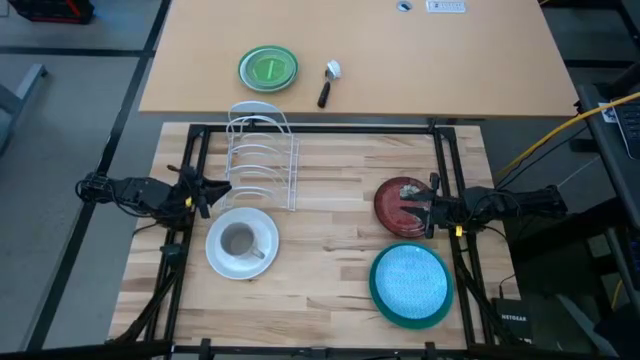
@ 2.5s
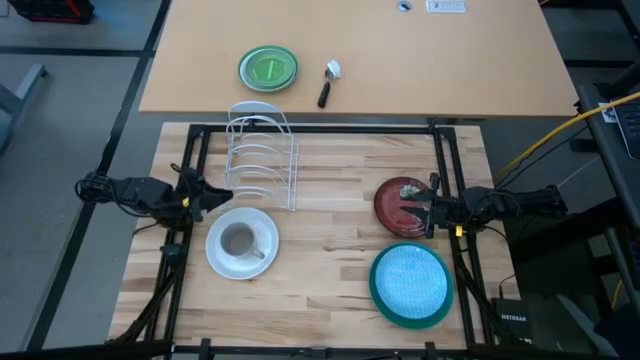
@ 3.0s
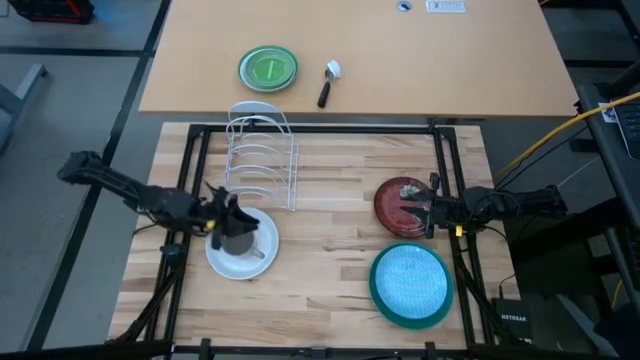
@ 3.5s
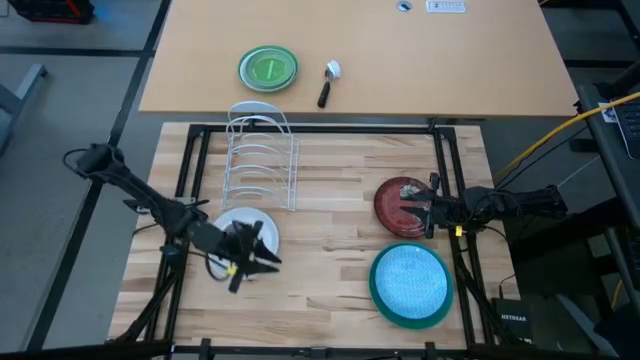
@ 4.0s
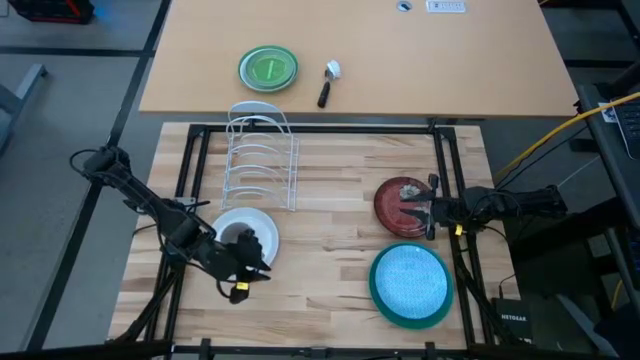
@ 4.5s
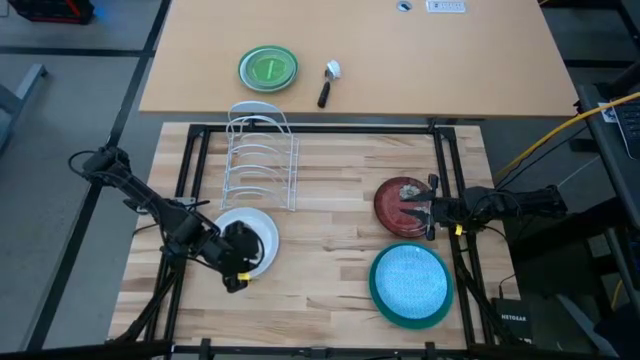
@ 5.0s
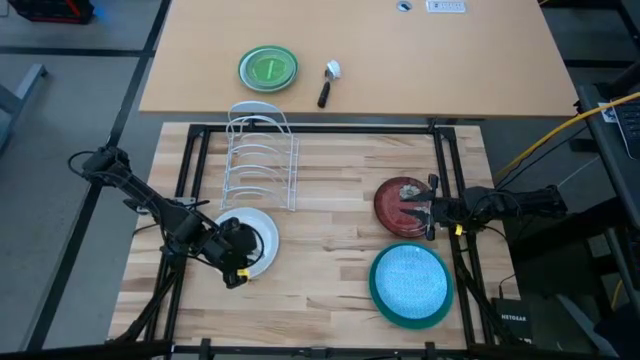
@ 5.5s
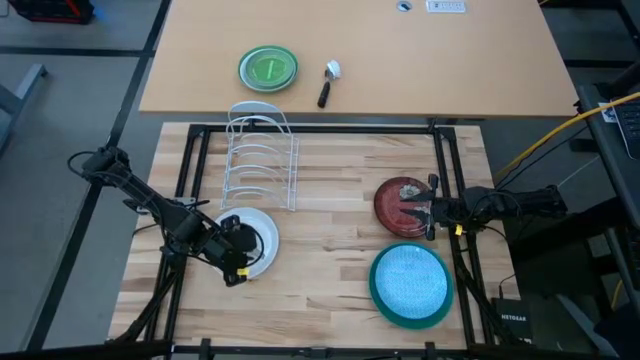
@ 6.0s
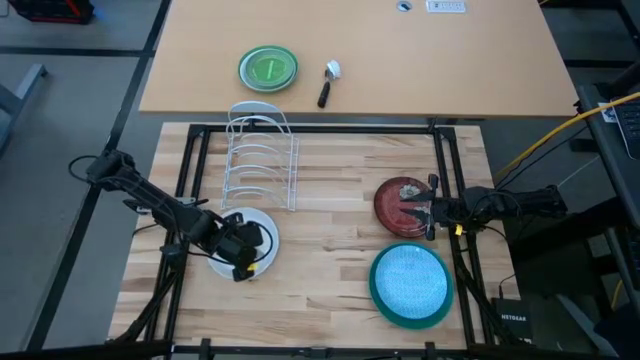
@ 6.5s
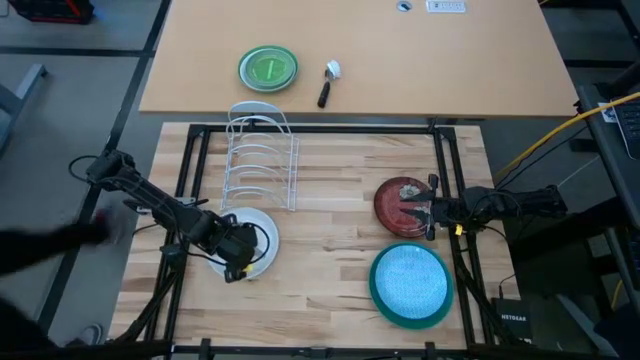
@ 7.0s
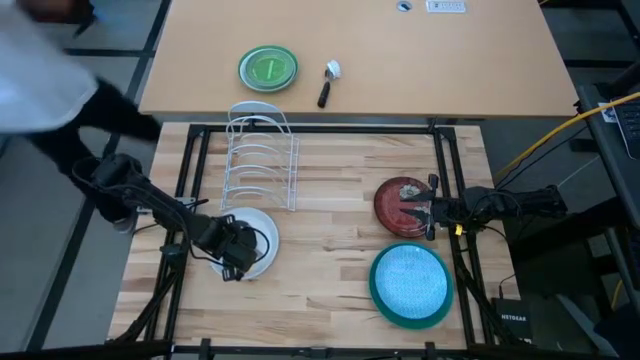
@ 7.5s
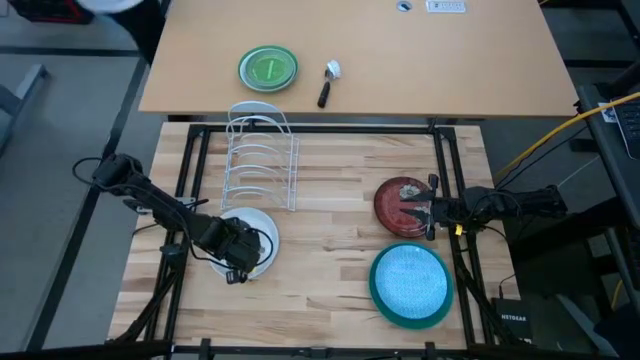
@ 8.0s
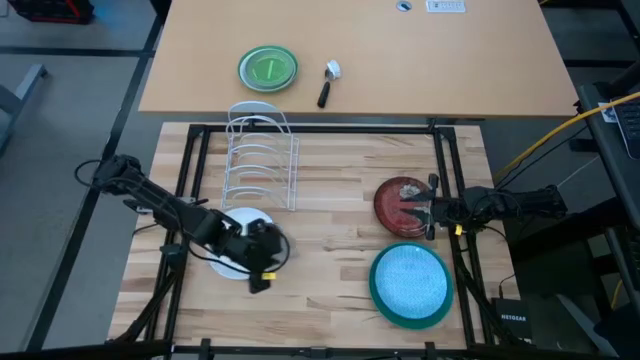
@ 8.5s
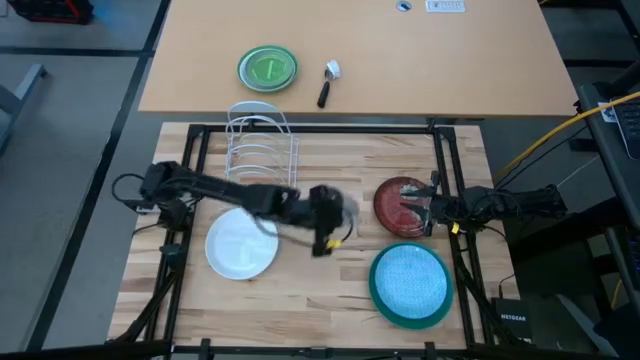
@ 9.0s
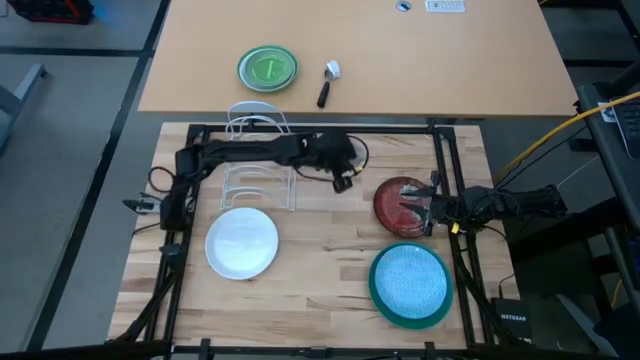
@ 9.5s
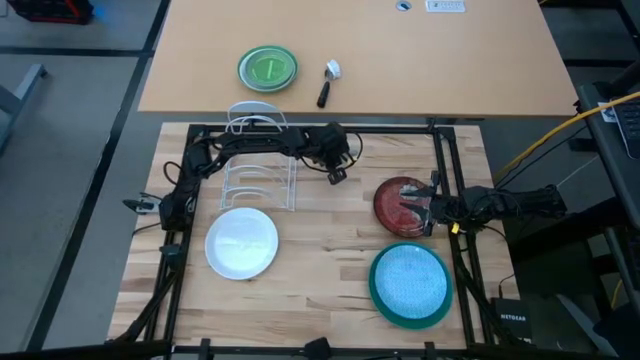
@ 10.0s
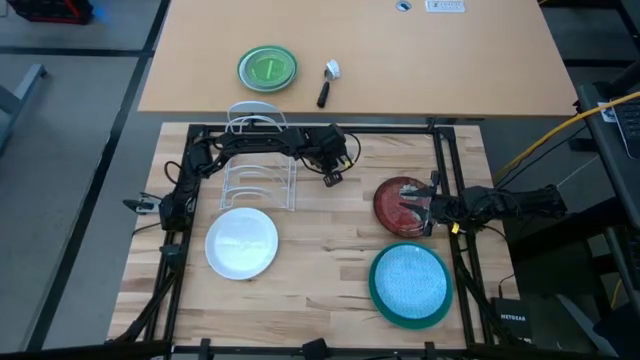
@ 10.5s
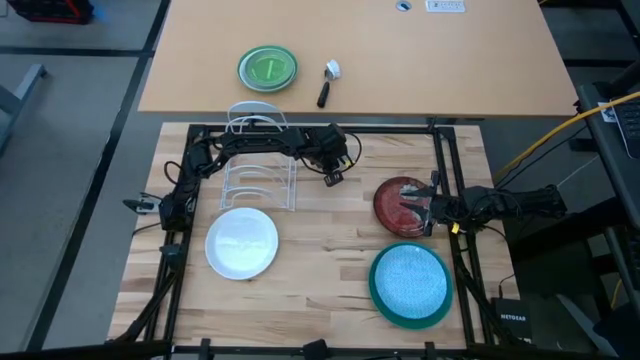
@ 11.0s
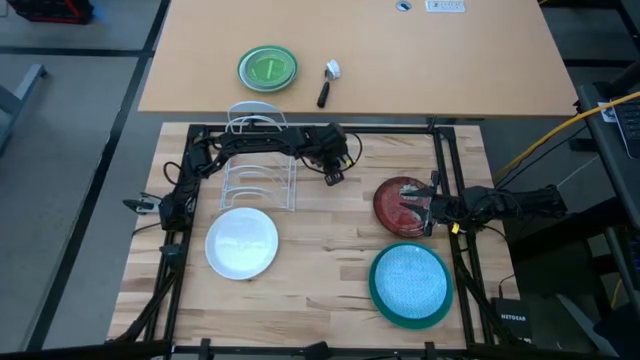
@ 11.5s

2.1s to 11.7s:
Task: Sort dishes
Move the gray mug to the top of the table

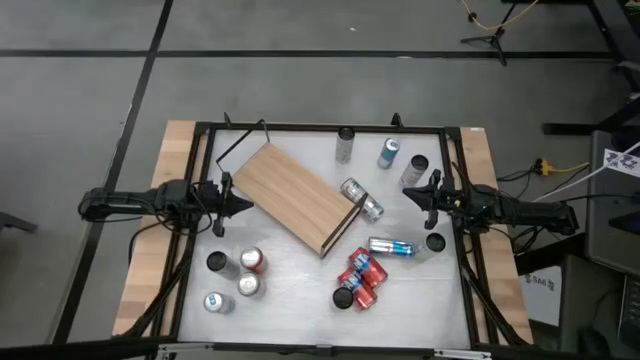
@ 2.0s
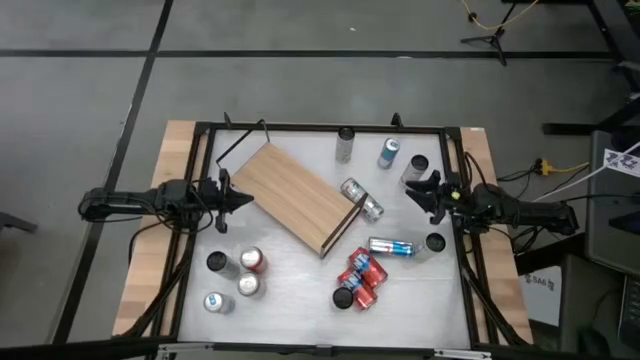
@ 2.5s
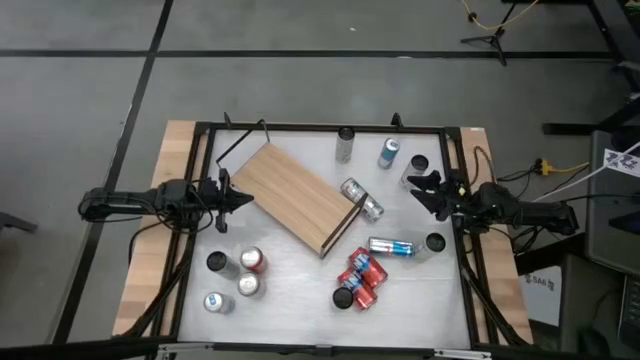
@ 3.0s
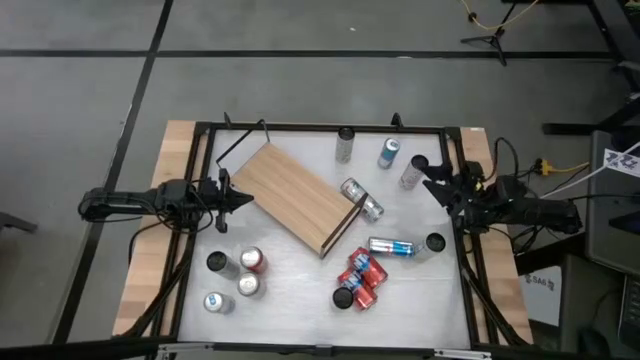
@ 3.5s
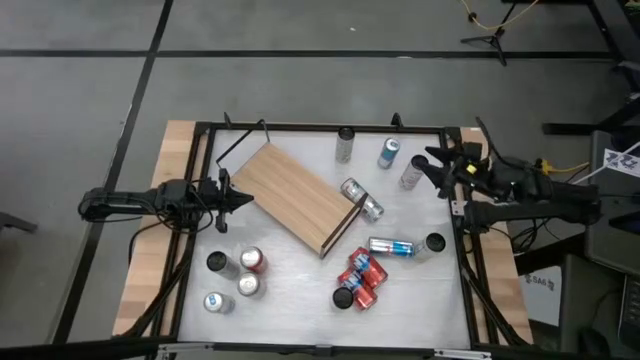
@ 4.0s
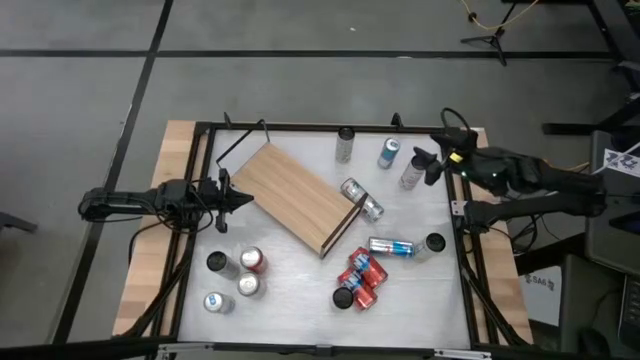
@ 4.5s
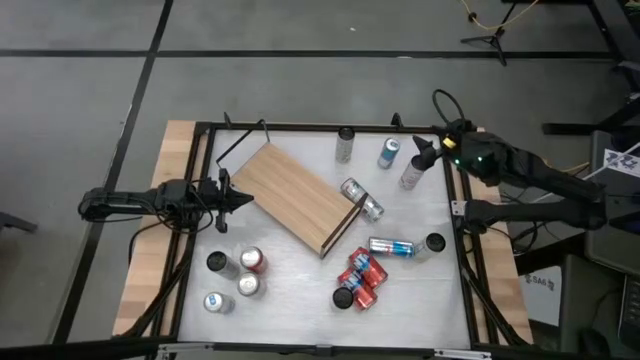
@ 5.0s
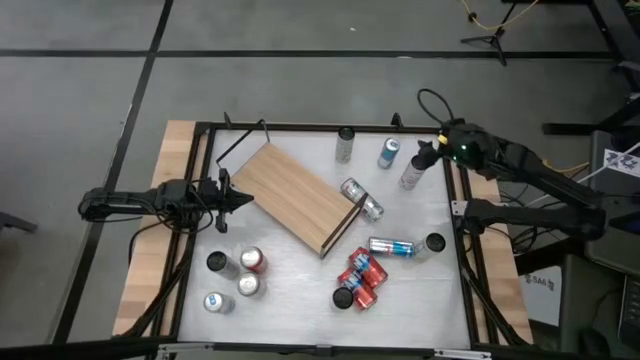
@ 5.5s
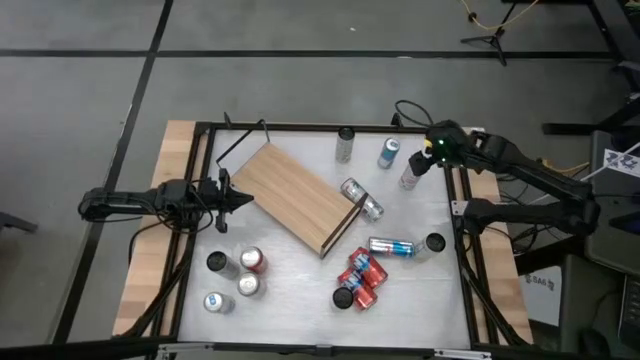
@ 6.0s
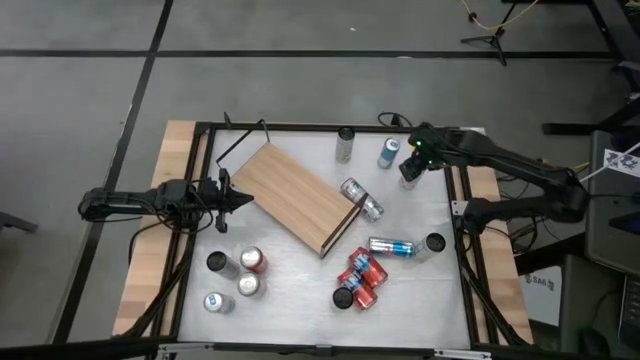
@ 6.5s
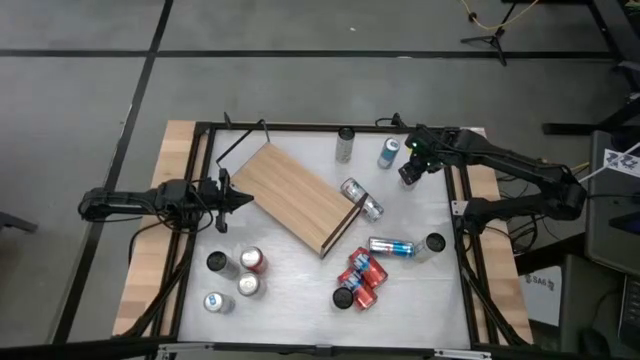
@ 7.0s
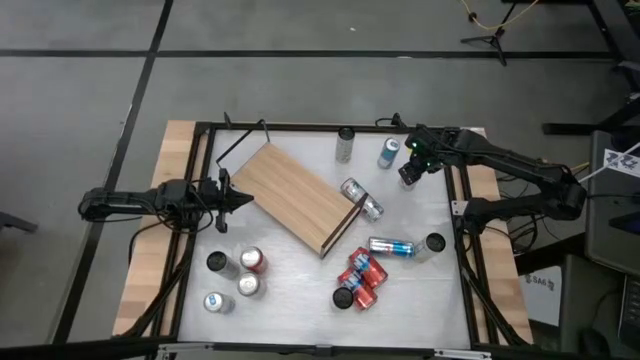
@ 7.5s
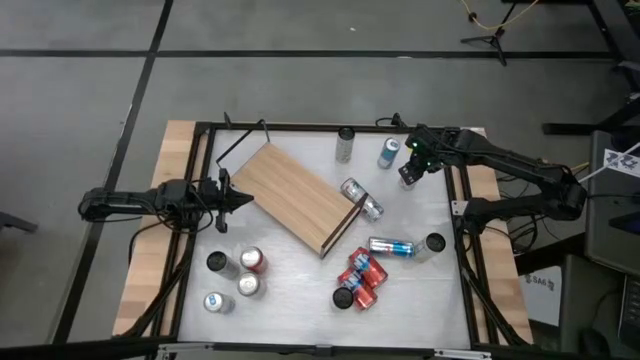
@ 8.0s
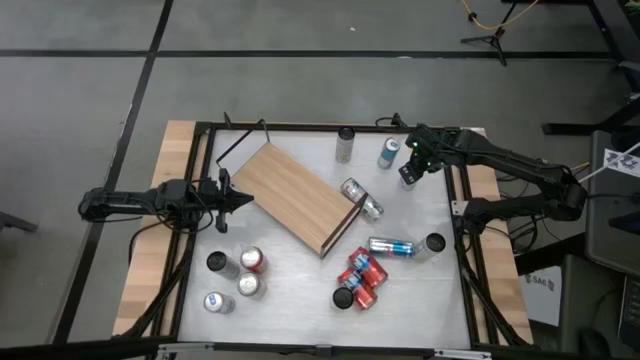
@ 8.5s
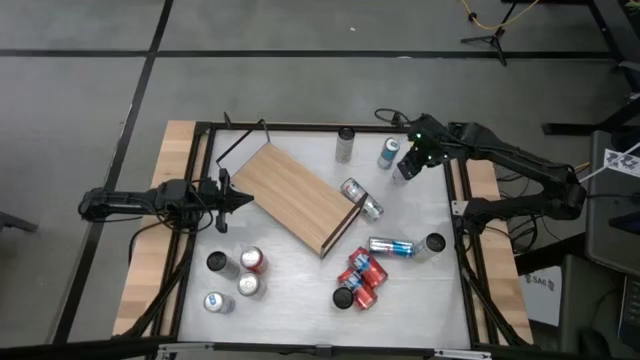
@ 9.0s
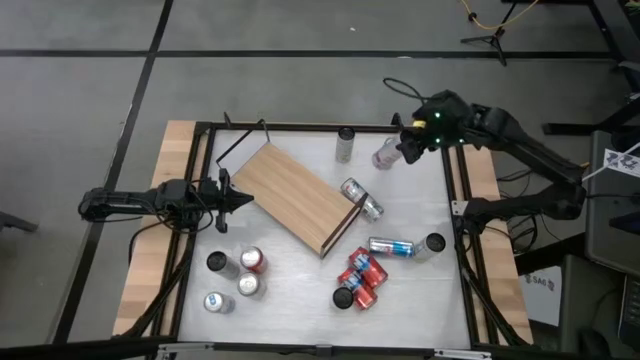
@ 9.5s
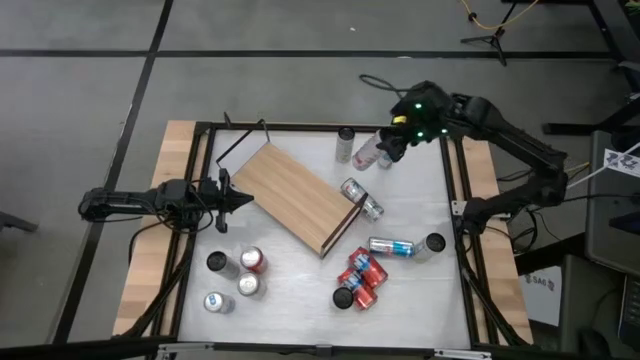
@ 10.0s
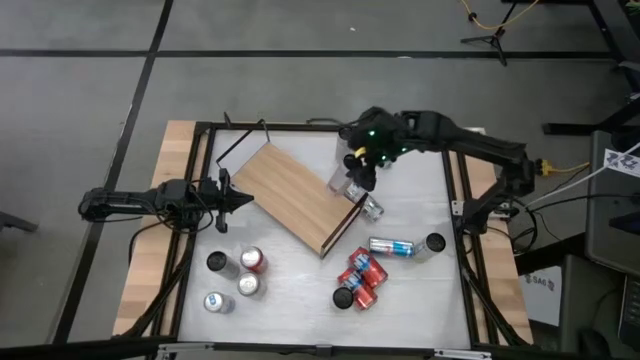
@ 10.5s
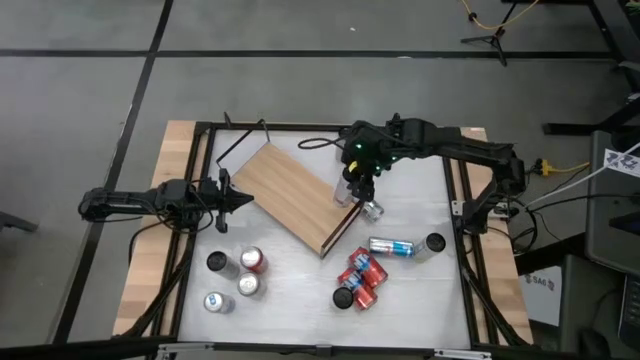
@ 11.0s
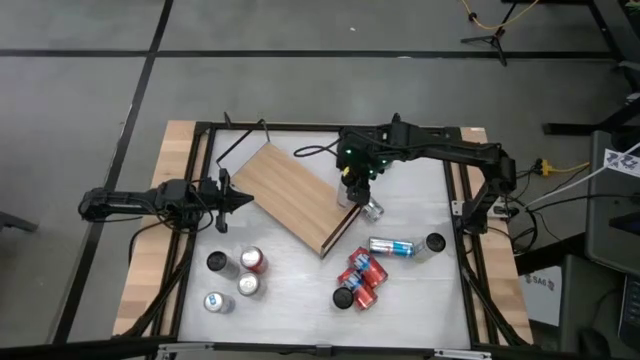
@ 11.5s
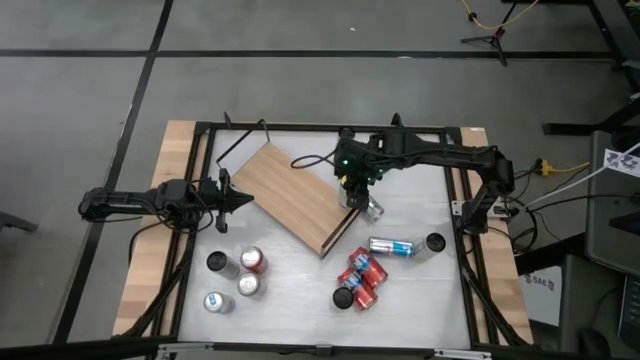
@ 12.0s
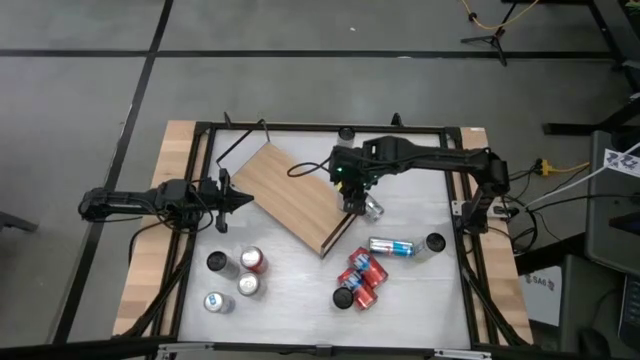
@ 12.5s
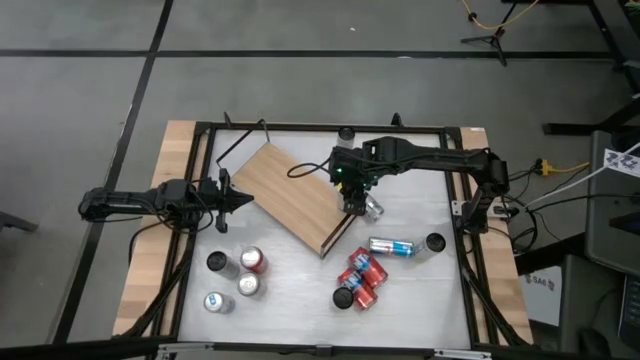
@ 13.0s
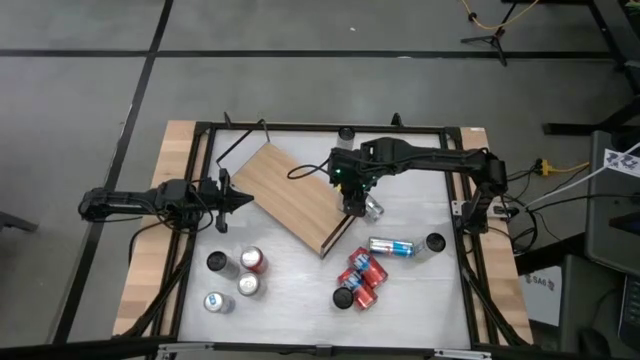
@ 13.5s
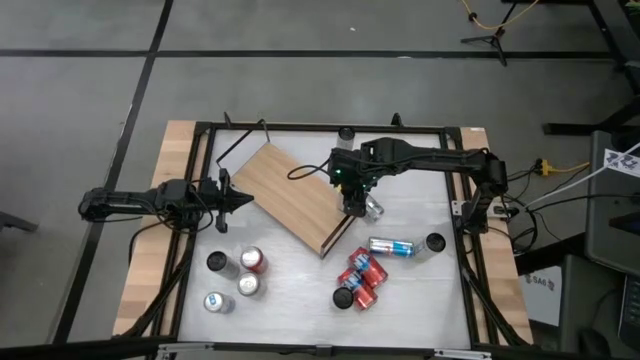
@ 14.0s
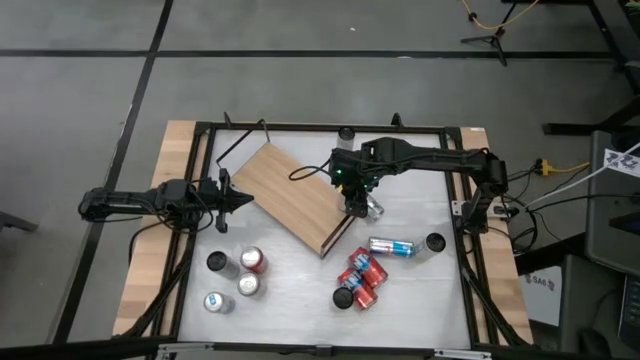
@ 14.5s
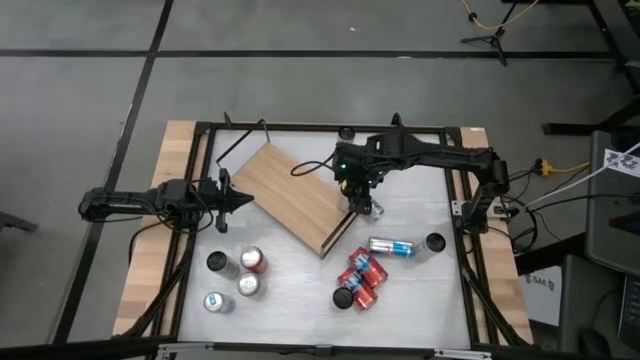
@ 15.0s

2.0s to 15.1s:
Task: Place canned beverage on shelf
Put the right white-pink soda can on the shelf
